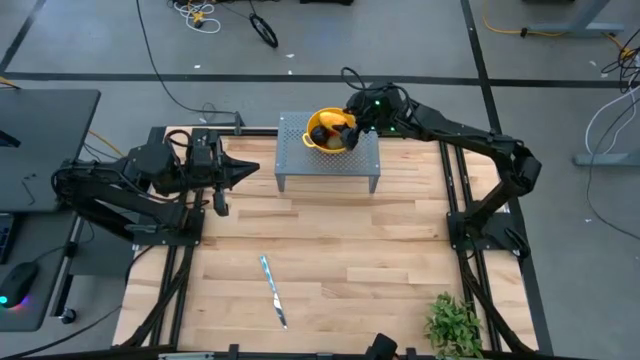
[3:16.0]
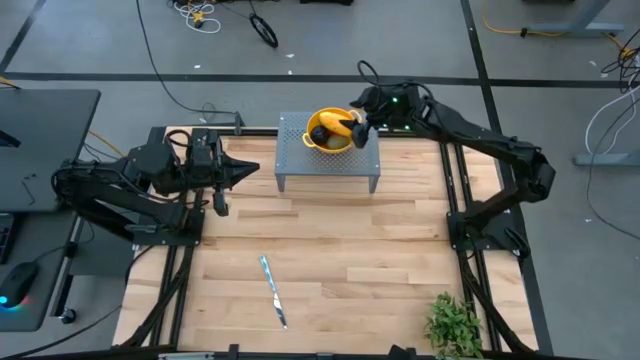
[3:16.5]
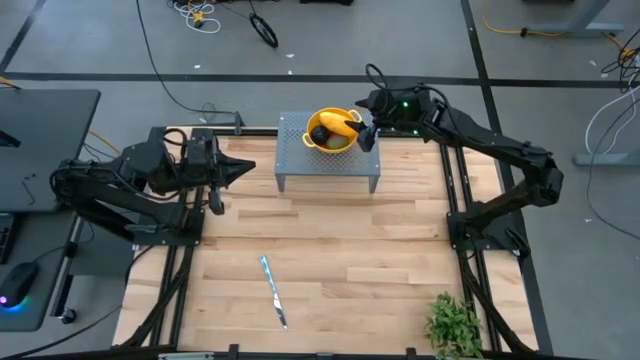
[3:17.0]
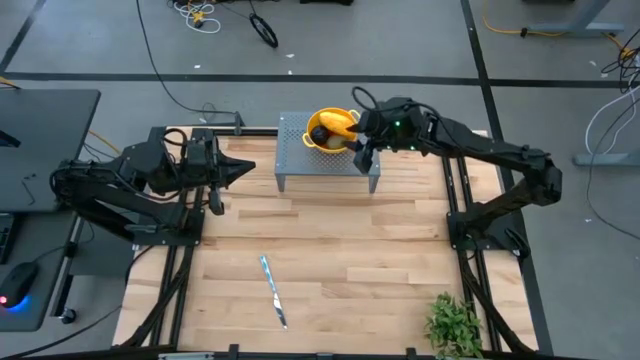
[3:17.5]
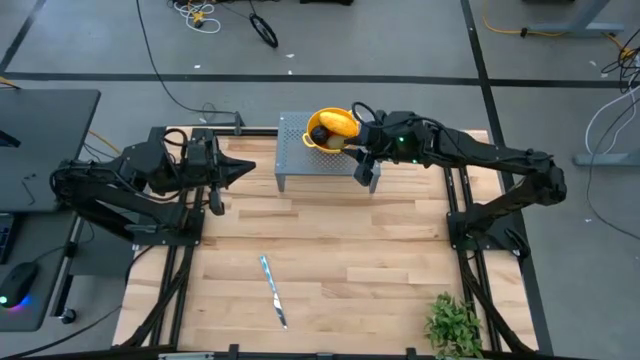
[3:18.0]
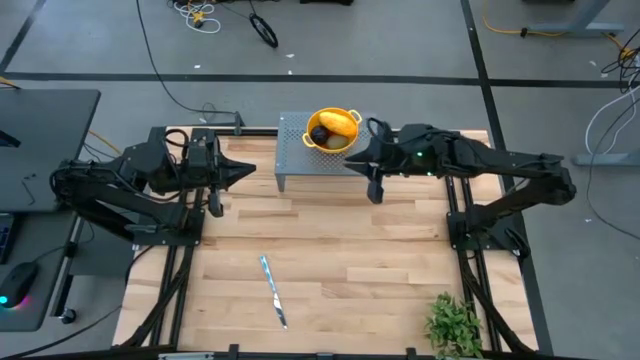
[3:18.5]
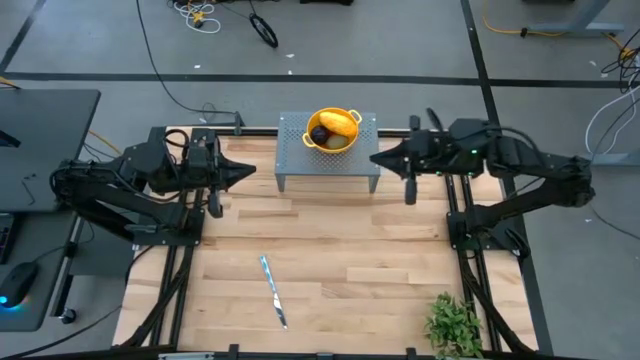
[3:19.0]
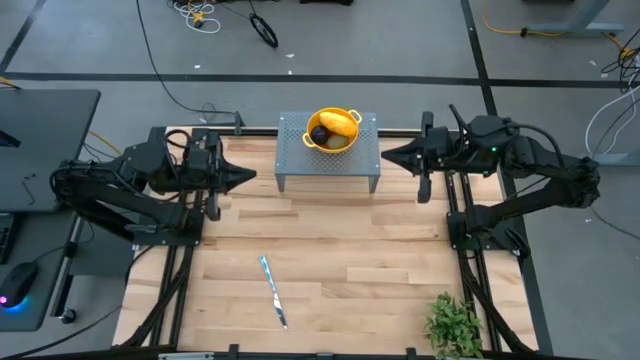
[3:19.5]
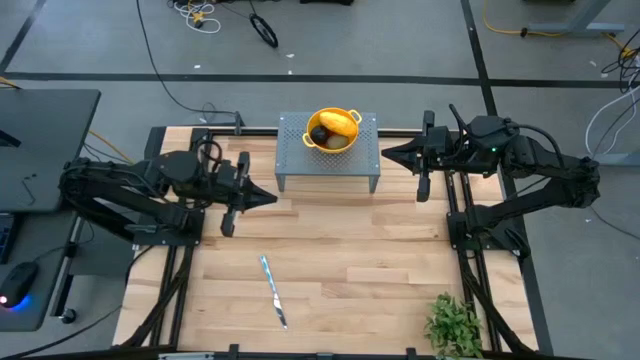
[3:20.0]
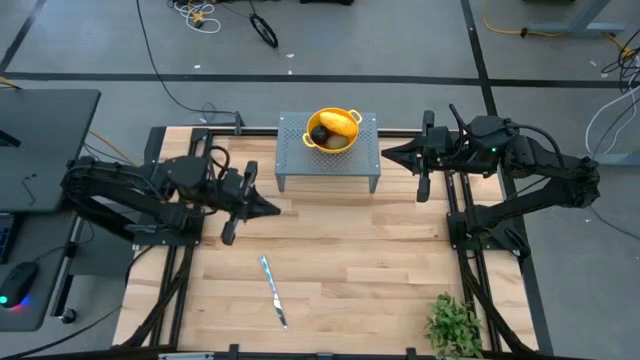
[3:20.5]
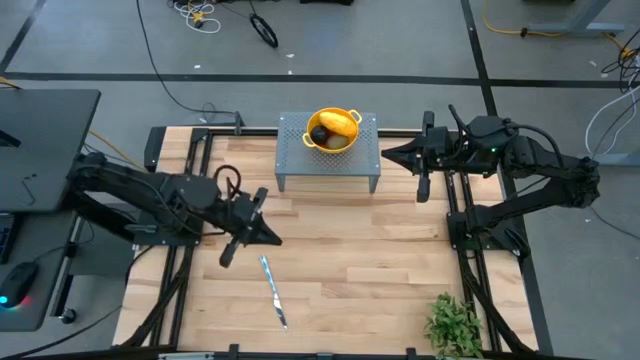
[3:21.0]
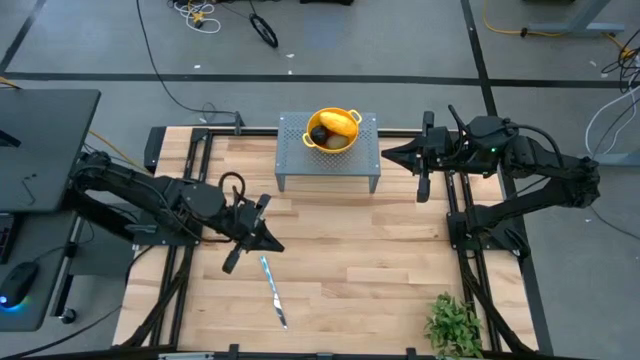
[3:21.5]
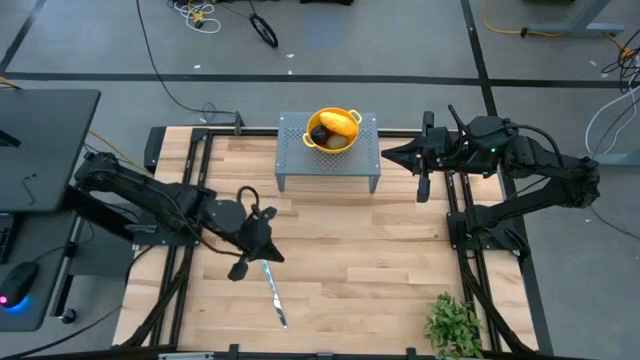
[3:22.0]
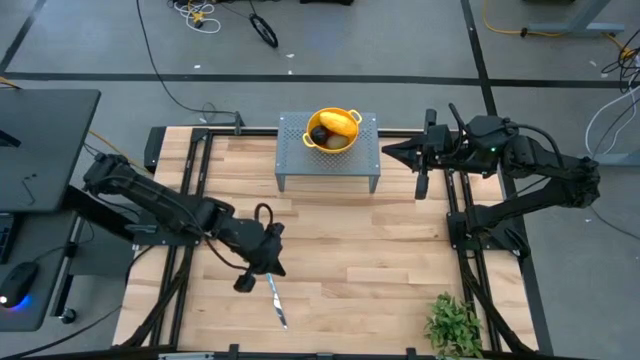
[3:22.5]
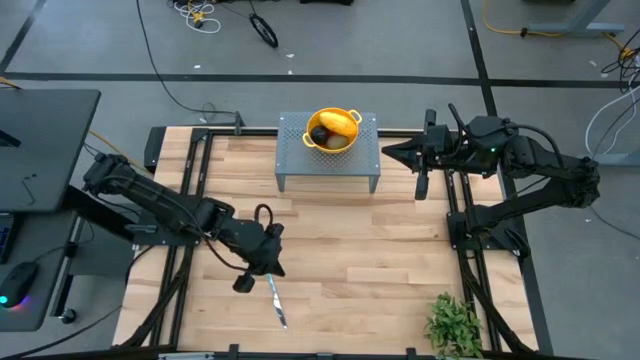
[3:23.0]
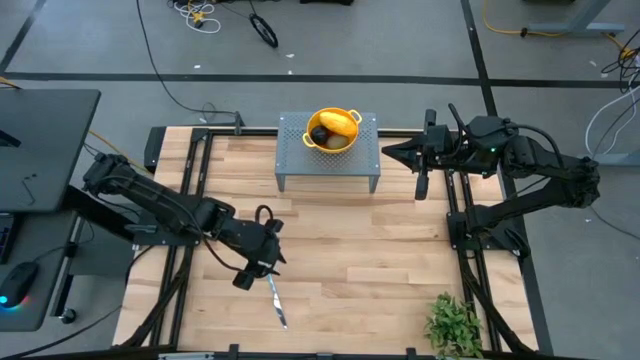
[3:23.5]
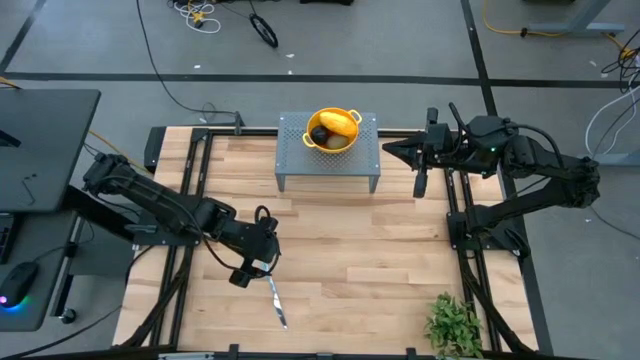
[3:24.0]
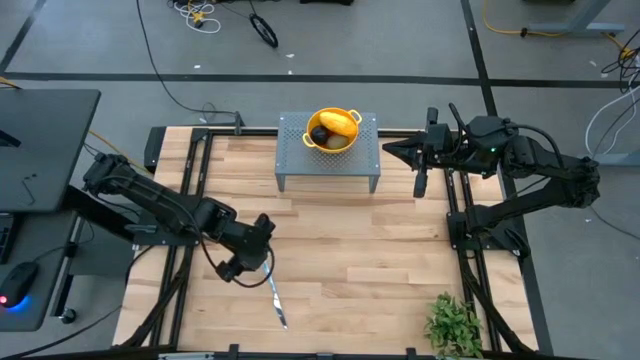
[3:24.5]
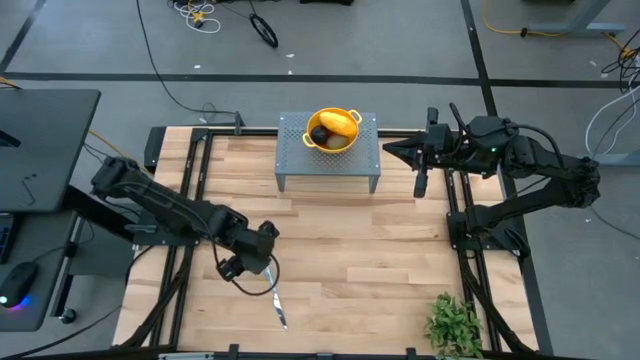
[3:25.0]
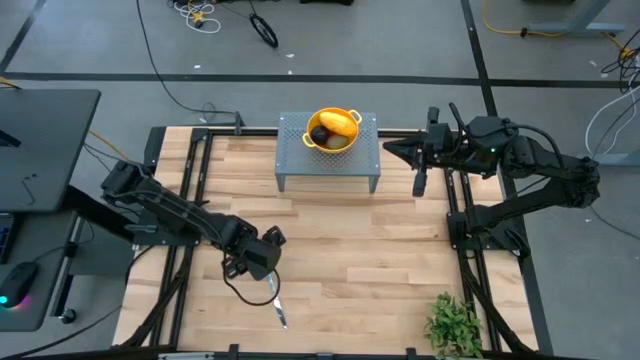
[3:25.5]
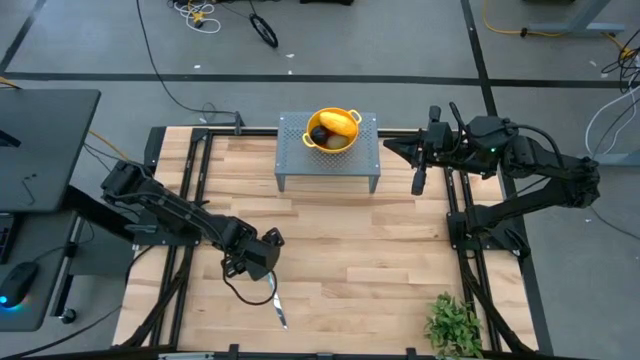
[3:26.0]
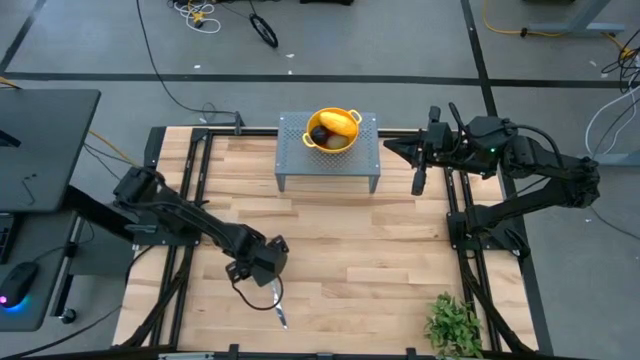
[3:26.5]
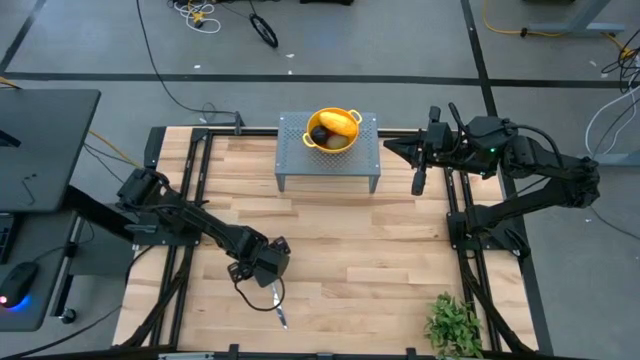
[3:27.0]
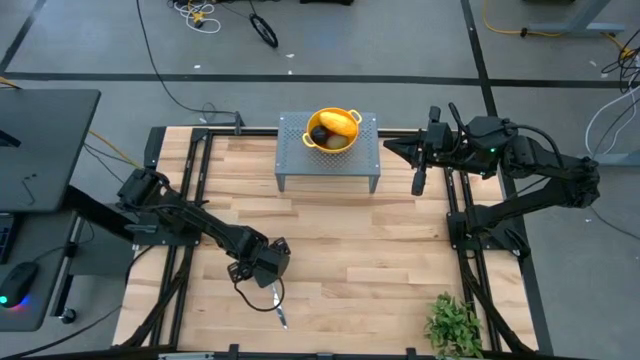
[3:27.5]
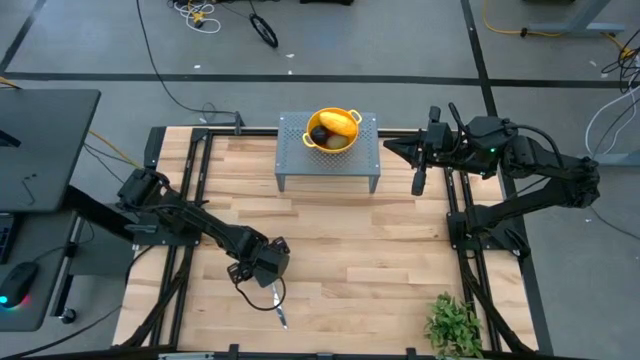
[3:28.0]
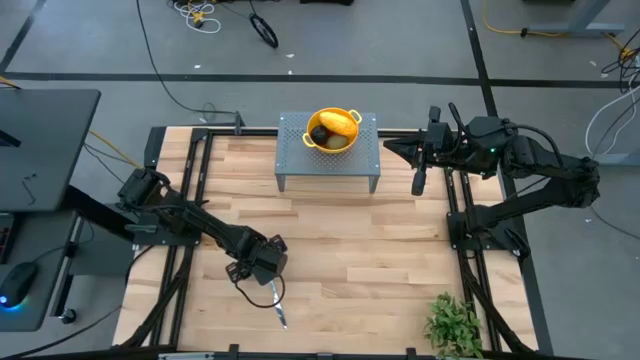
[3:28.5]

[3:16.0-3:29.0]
Task: Pick & Place Fruit
Put the green table knife to the left of the colander bowl on the shelf

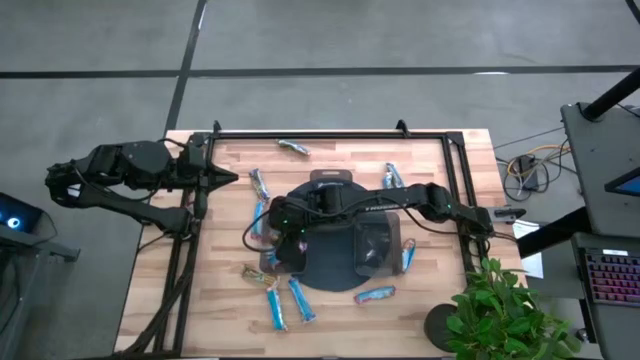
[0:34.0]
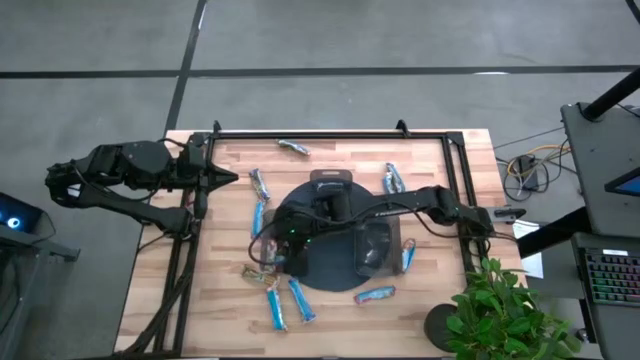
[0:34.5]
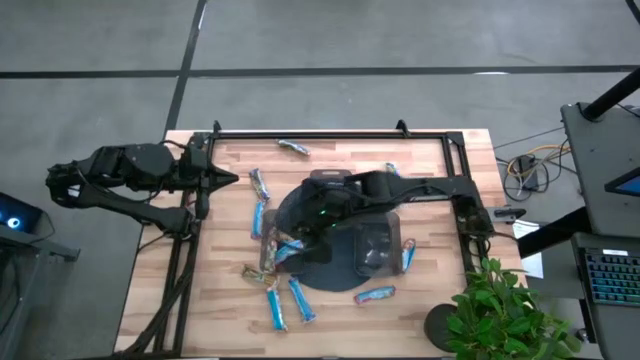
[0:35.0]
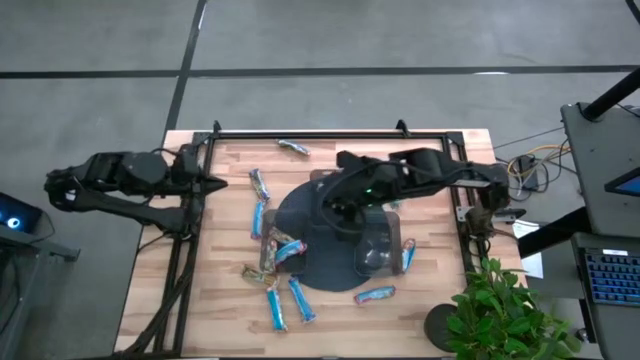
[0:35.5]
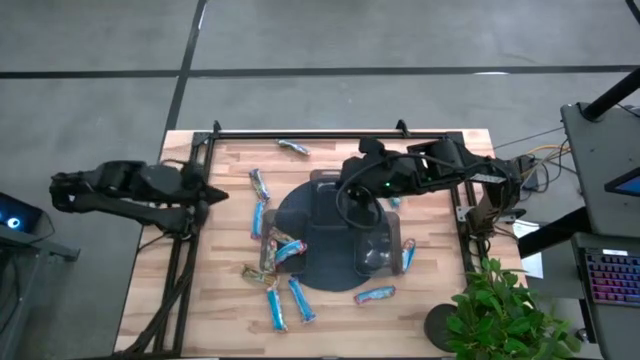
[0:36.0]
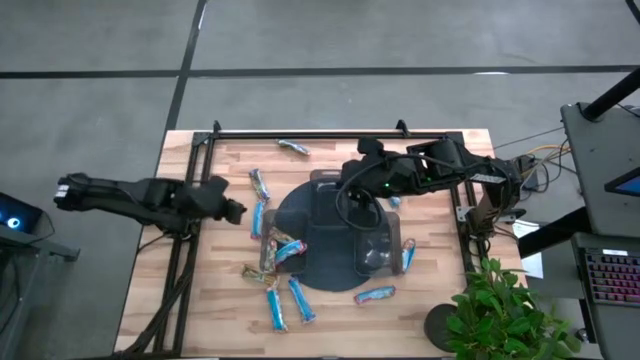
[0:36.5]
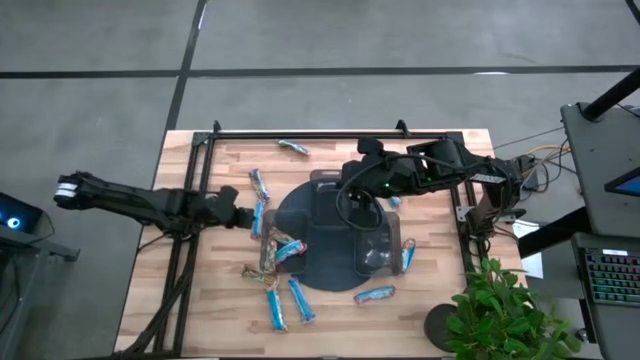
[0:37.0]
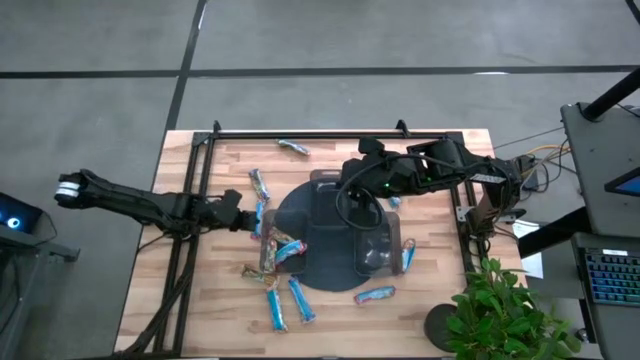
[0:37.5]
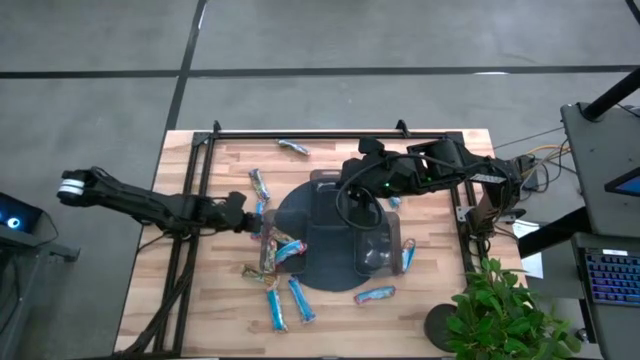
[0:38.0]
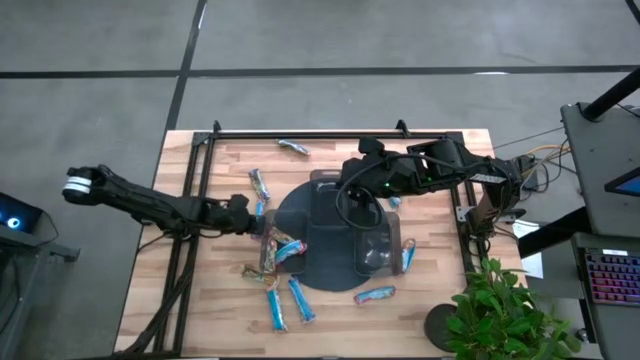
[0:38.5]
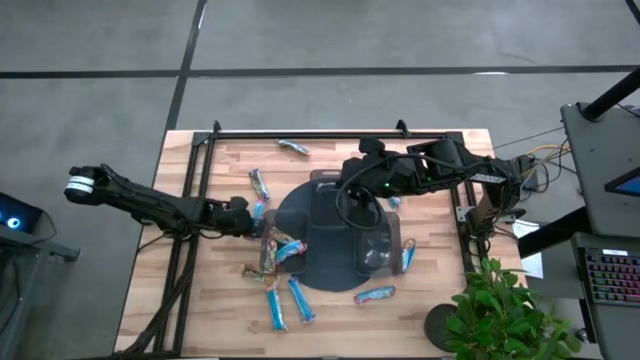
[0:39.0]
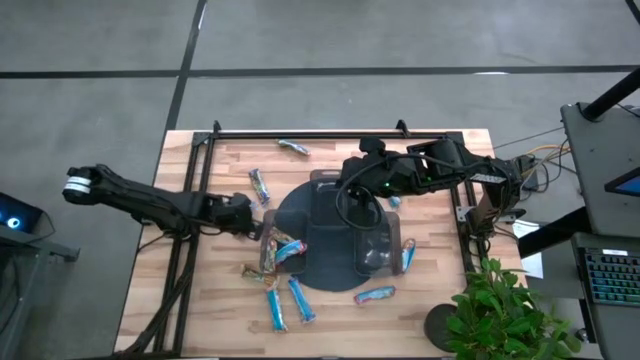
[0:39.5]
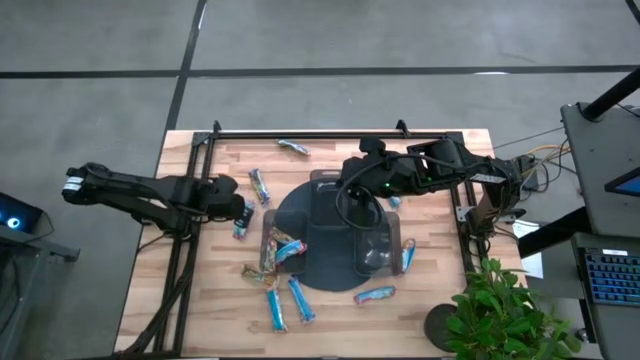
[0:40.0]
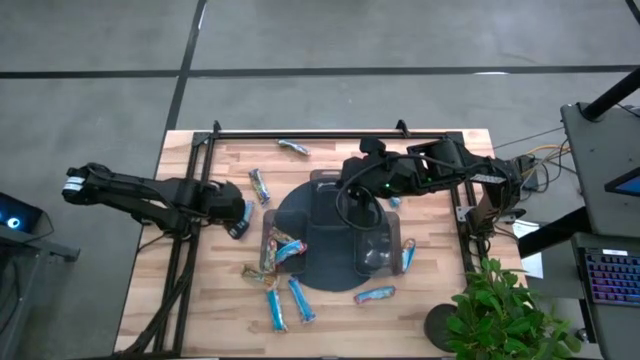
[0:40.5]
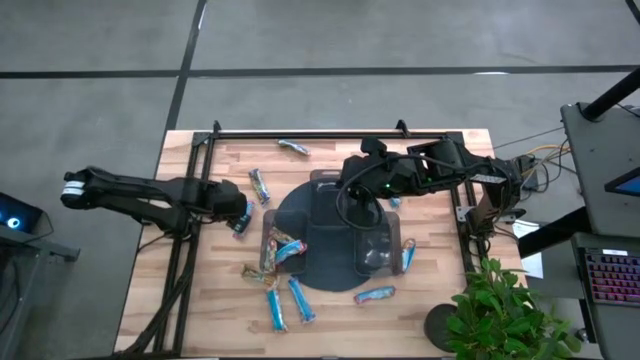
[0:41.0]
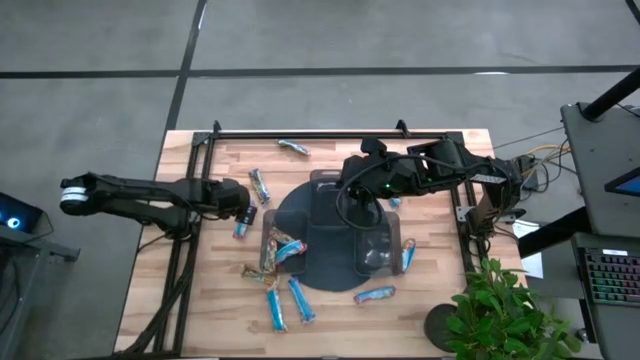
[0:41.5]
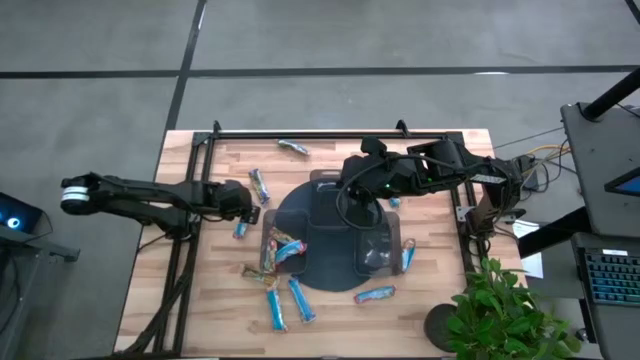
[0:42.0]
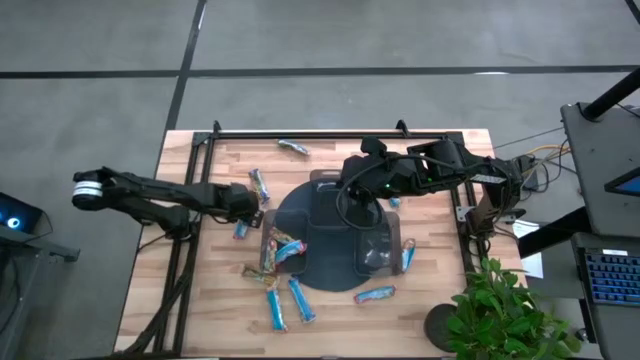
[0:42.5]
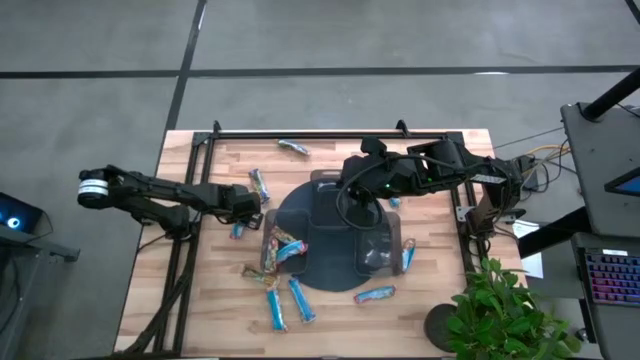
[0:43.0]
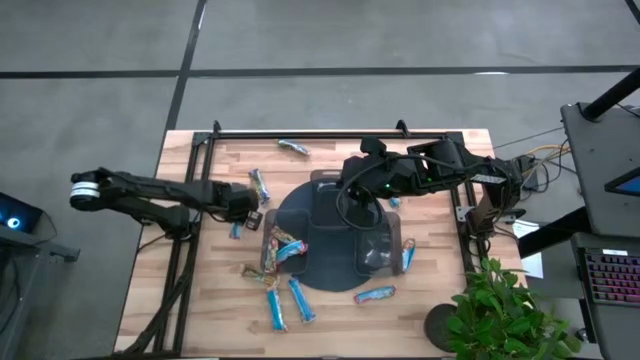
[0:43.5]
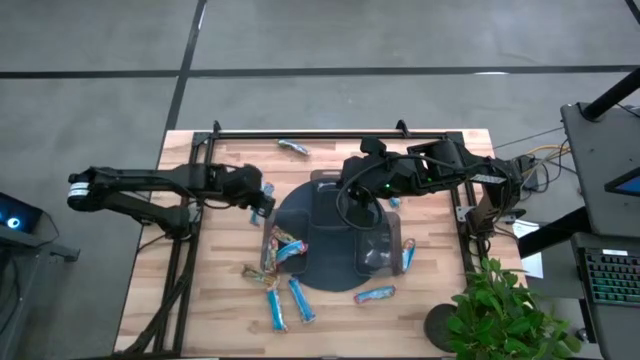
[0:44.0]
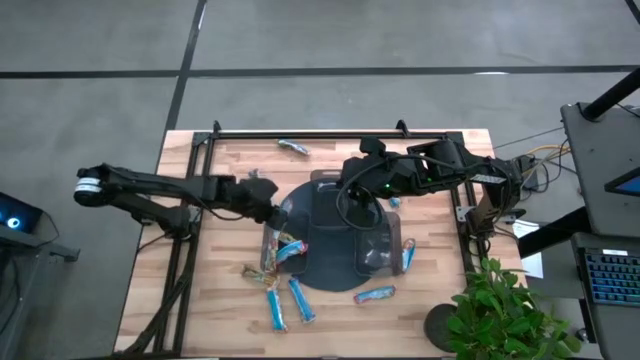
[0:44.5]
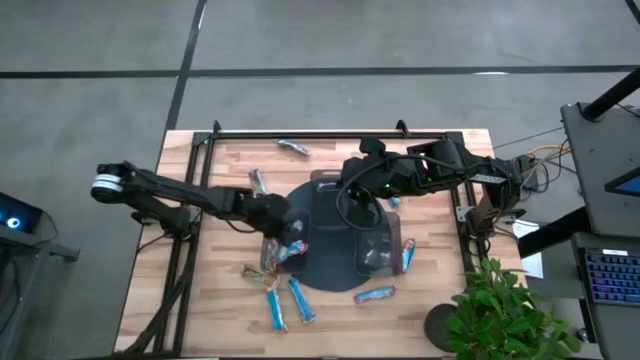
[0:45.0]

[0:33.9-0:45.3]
Task: Pick and place Granola Bars by type
Put the red granola bar into the bottom left black bin
